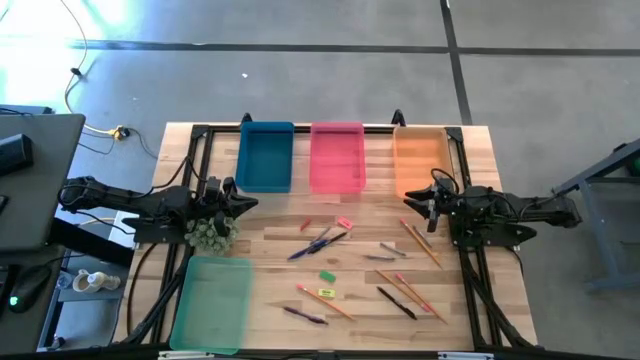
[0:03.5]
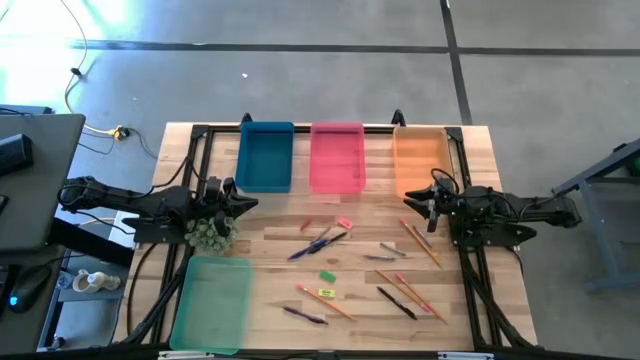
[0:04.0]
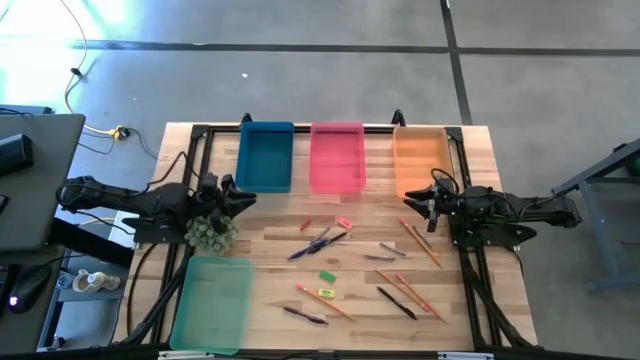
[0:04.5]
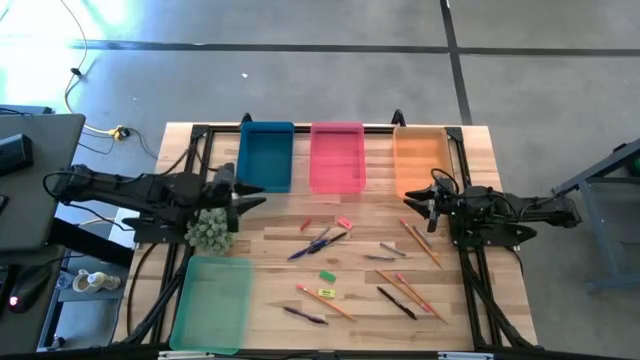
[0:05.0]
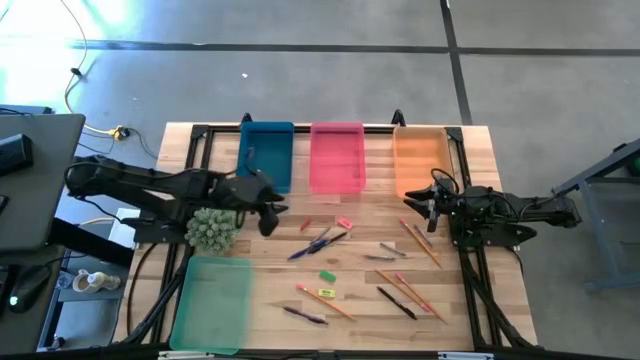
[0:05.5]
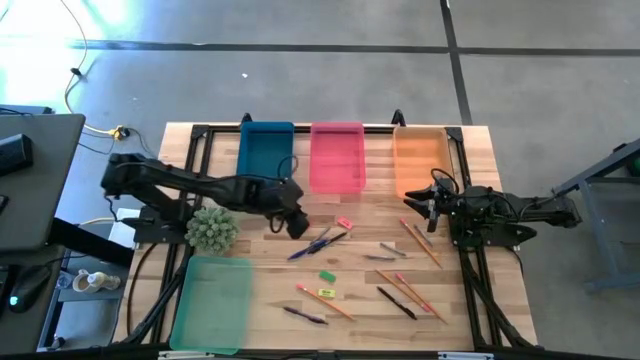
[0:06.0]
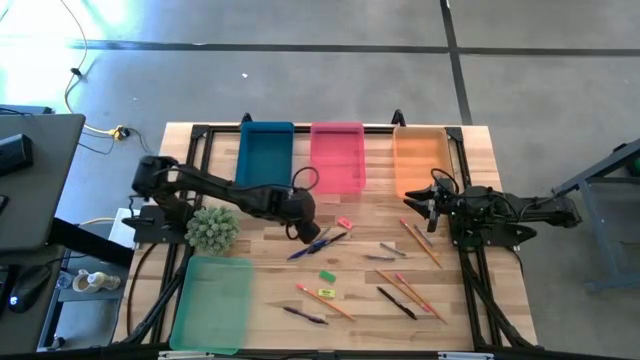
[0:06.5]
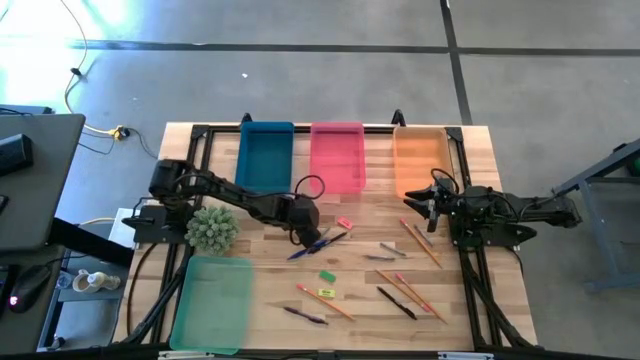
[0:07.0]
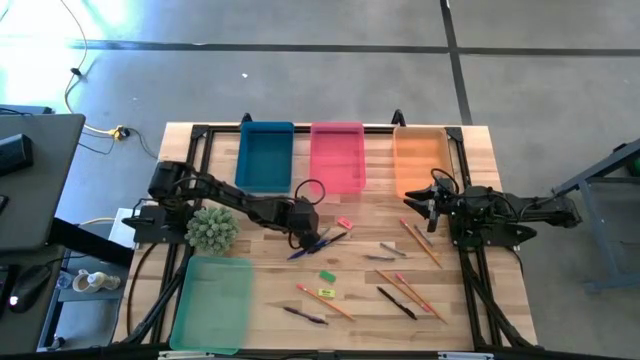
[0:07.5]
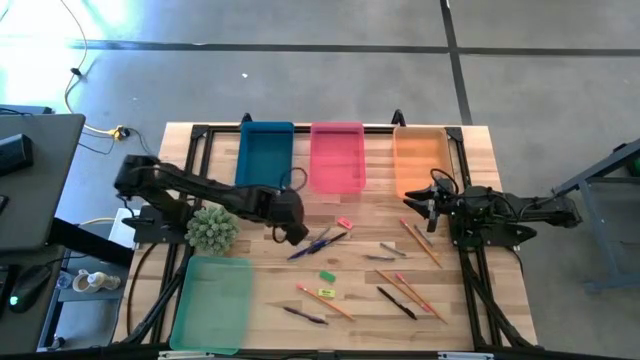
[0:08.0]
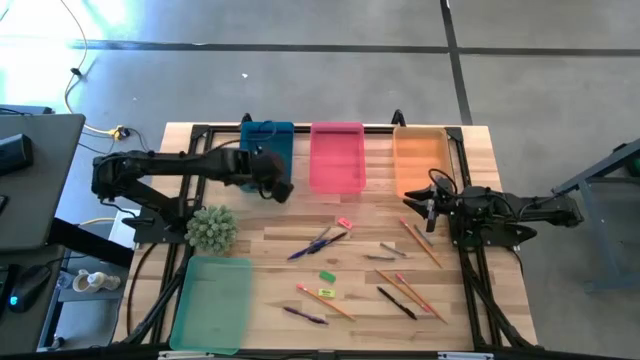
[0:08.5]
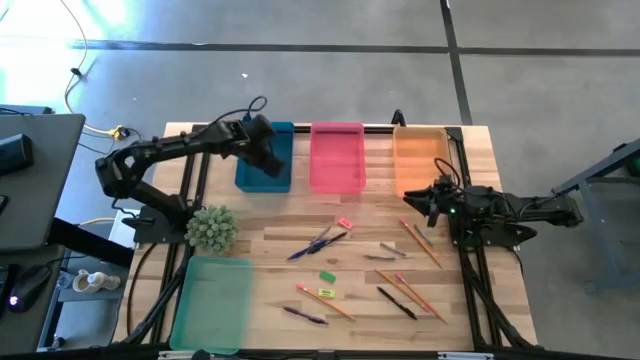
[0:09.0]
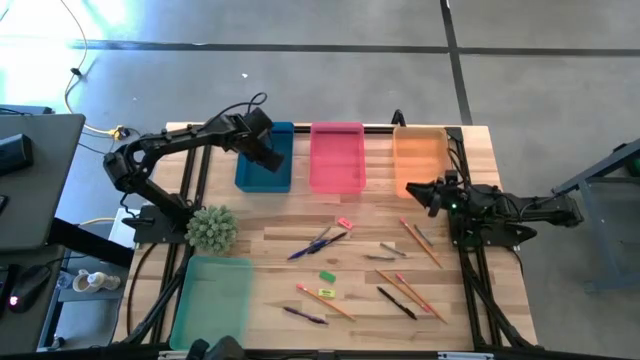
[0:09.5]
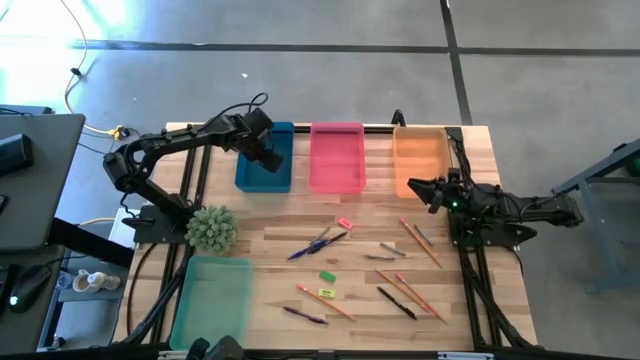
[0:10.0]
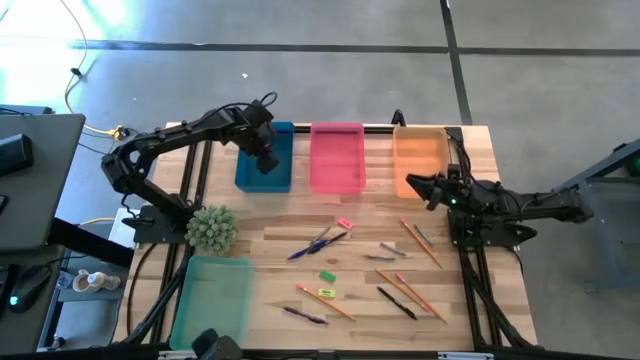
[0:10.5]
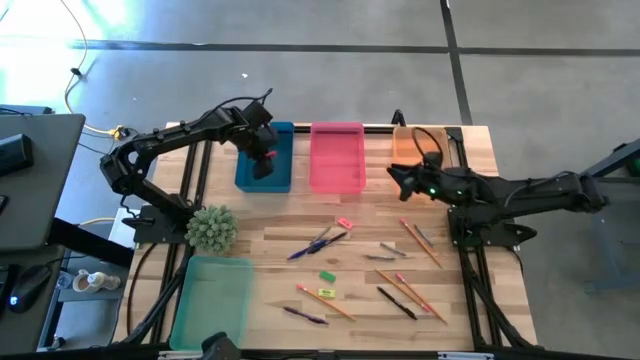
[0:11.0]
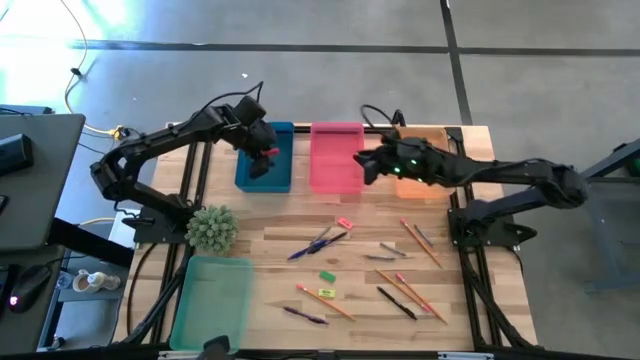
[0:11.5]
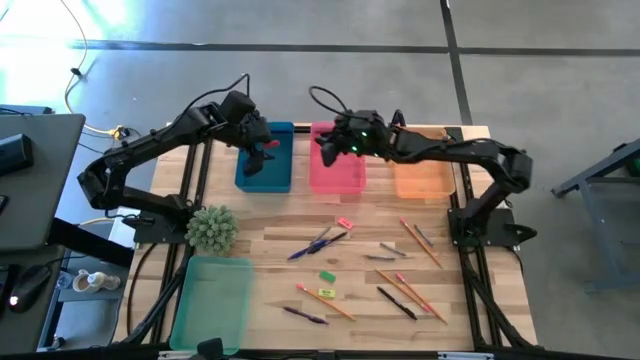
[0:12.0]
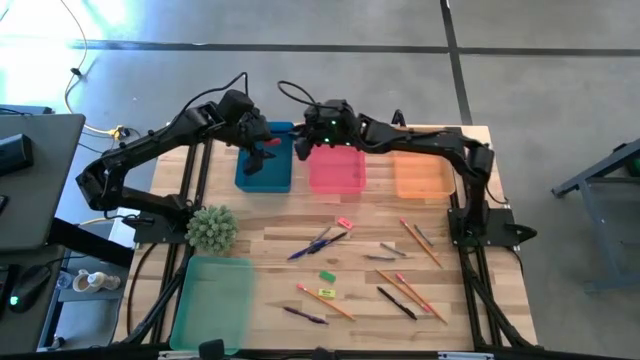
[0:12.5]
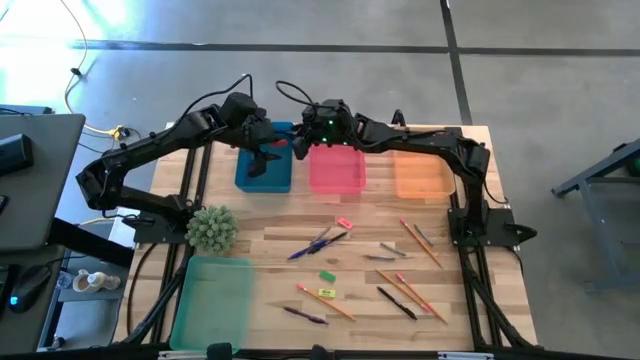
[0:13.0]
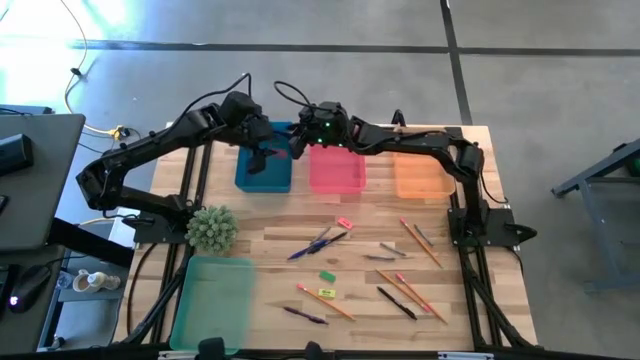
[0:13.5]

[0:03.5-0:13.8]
Task: Sort crayons/erasers/pens/pencils in bins
Put the orange eraser into the blue bin

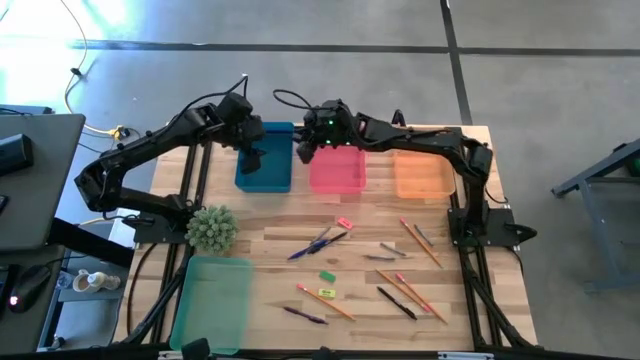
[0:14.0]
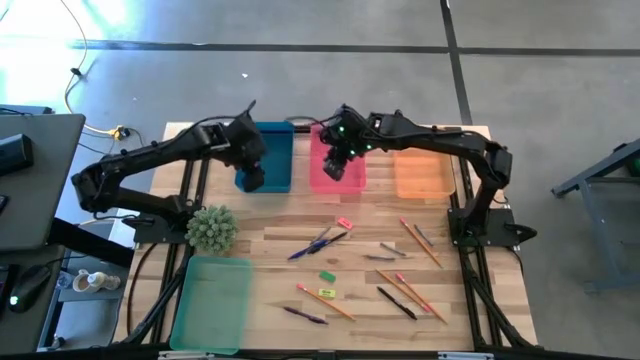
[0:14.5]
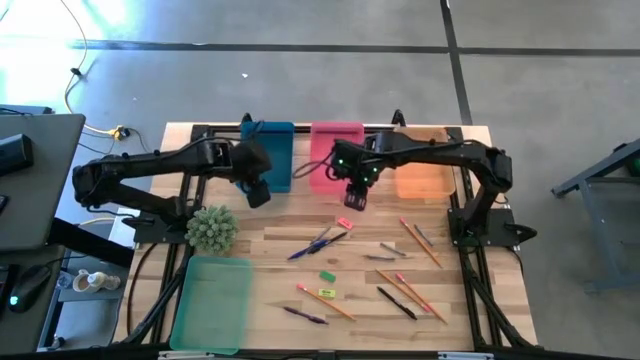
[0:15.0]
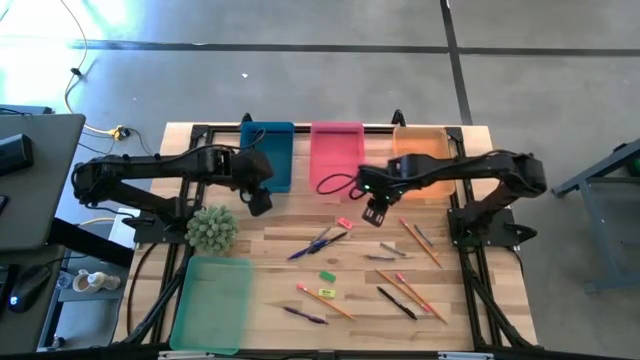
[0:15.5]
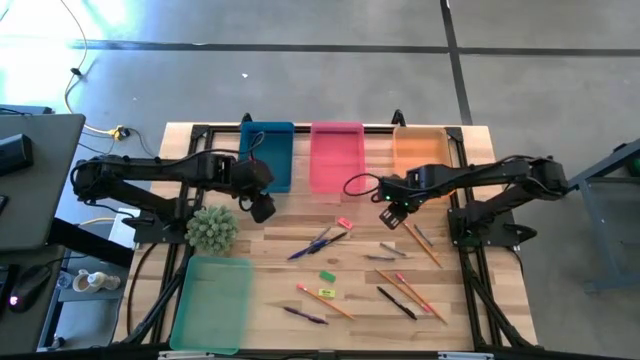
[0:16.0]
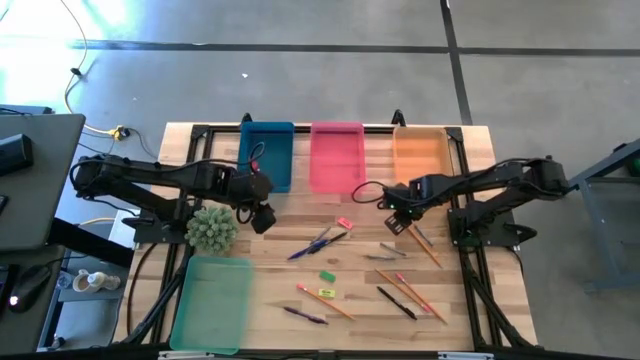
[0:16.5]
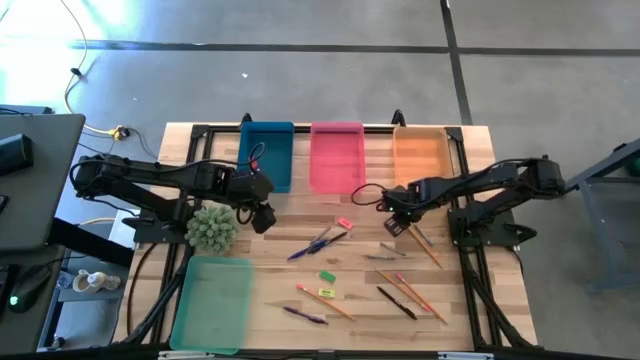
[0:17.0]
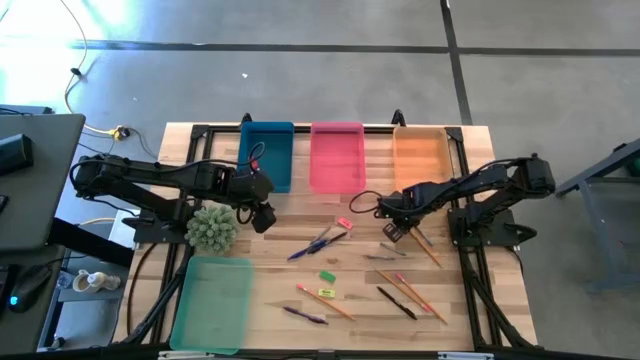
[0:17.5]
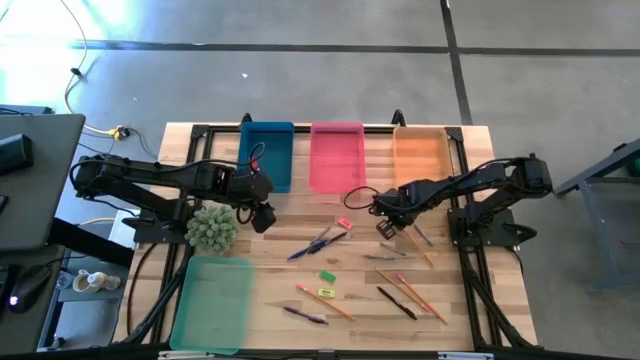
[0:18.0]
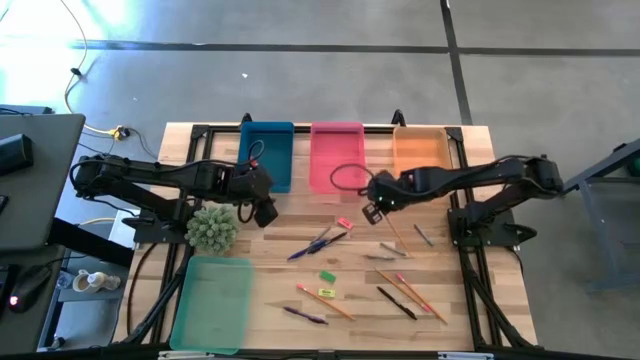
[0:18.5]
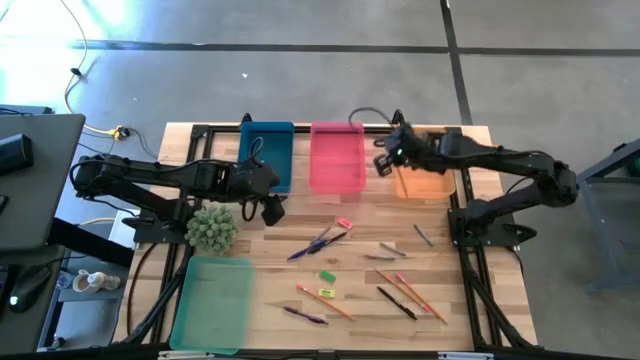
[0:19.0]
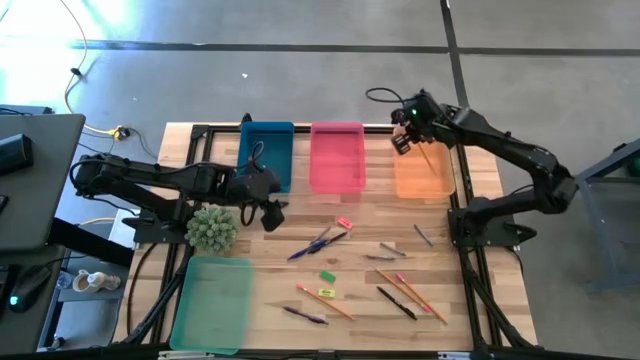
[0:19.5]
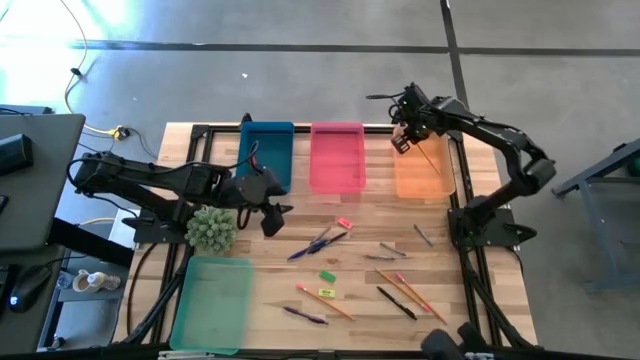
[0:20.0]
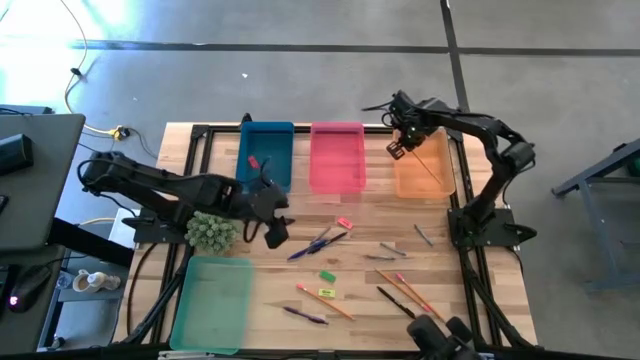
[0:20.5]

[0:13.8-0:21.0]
Put the pencil into the light orange bin

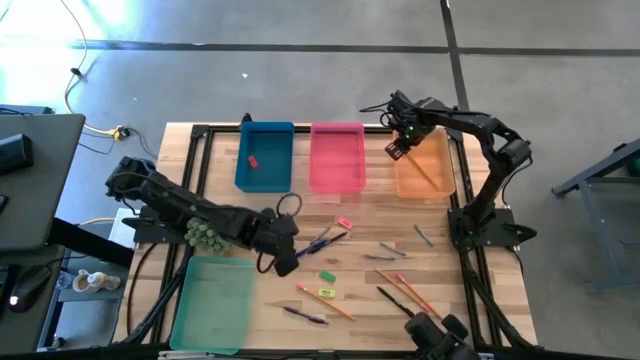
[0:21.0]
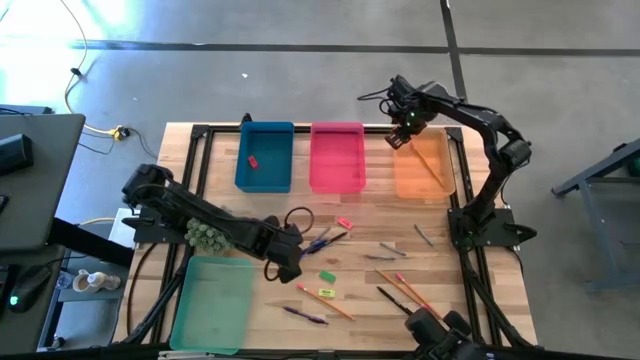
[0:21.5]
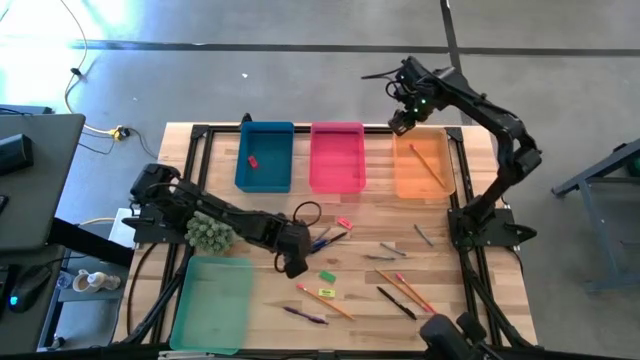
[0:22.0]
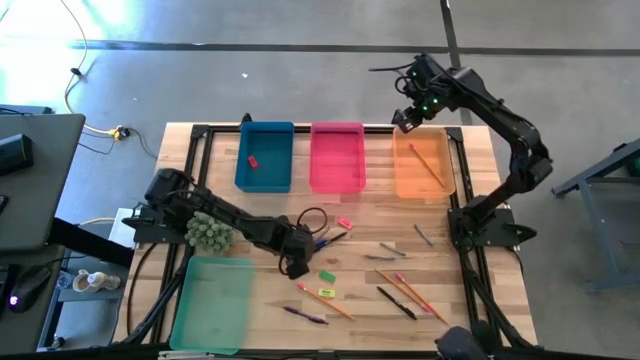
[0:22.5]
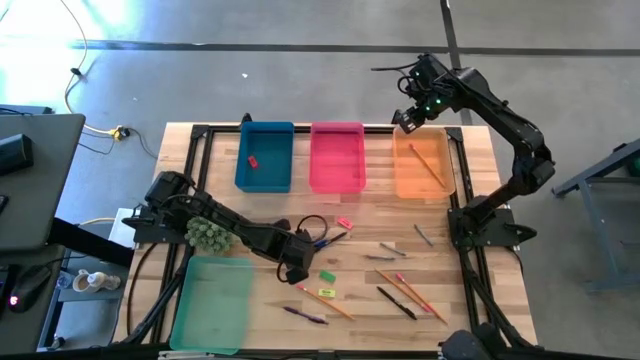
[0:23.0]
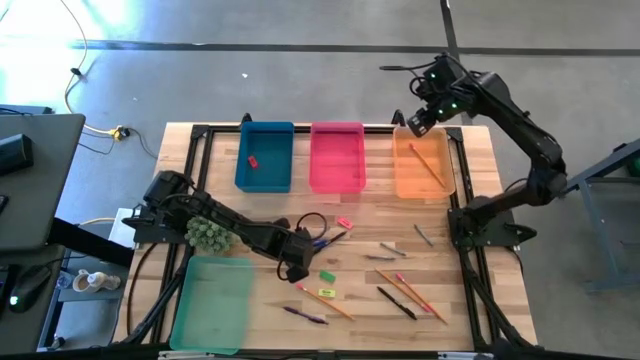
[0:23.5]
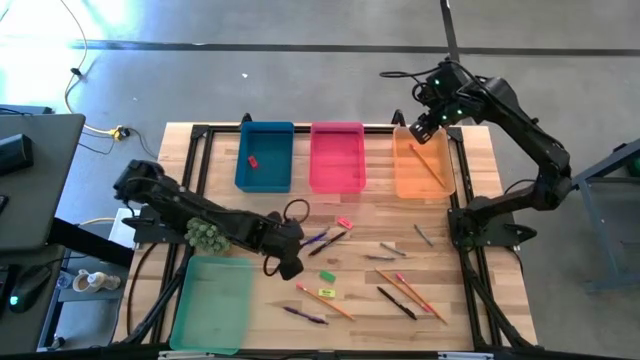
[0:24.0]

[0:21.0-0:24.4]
Put the blue pen into the blue bin
